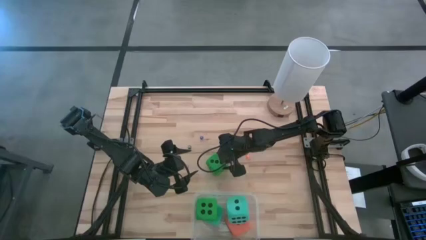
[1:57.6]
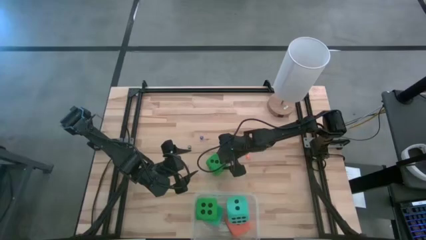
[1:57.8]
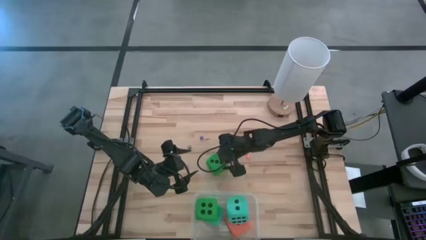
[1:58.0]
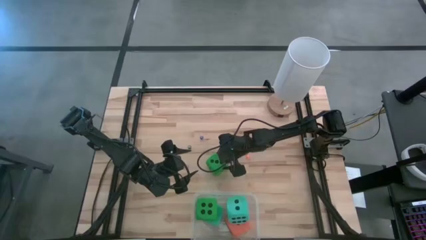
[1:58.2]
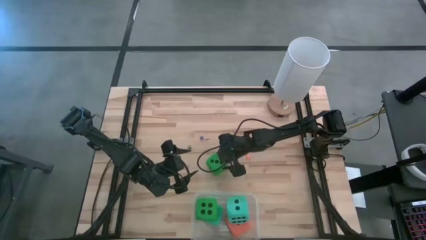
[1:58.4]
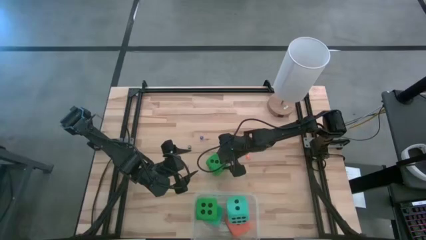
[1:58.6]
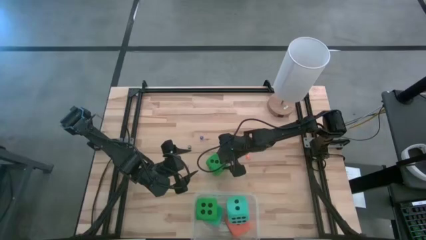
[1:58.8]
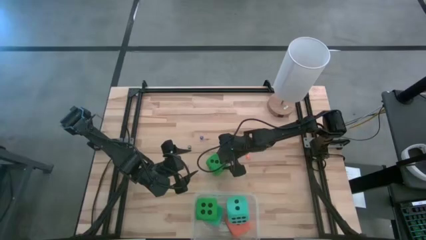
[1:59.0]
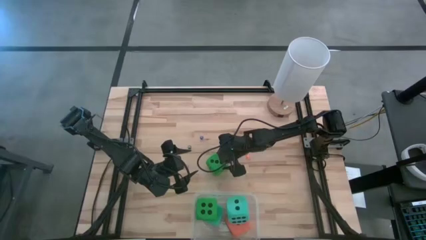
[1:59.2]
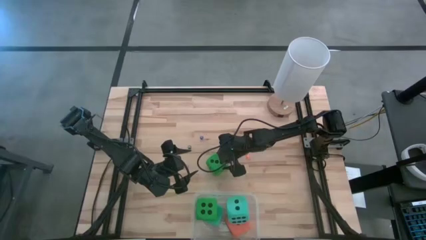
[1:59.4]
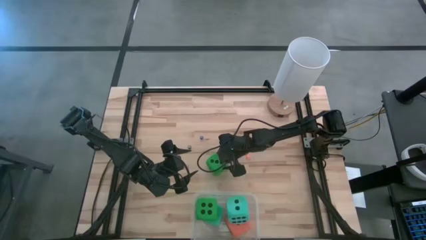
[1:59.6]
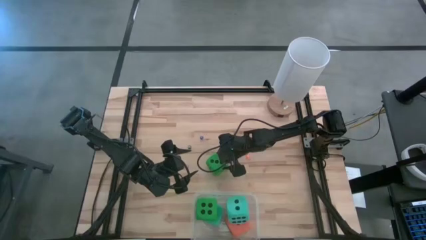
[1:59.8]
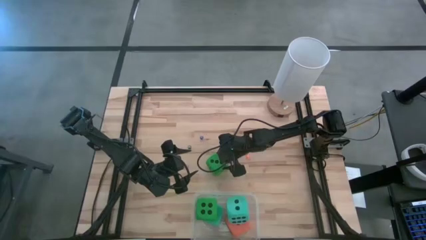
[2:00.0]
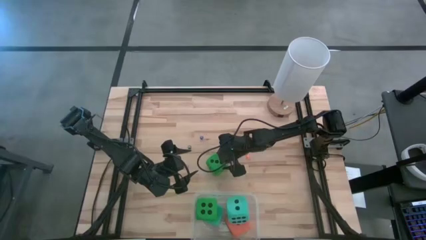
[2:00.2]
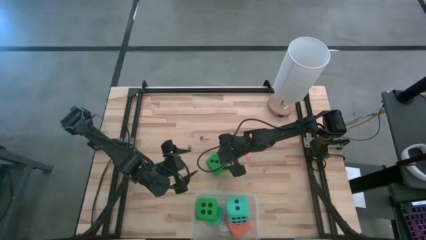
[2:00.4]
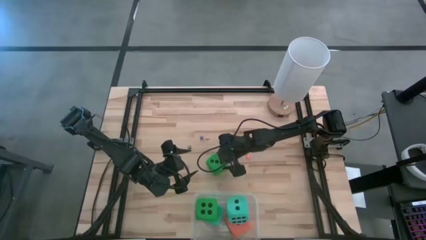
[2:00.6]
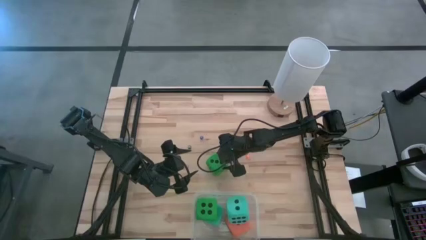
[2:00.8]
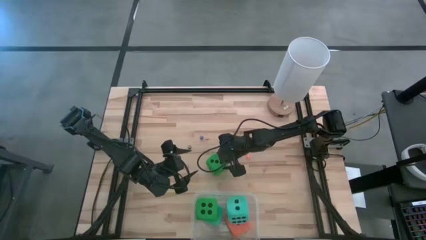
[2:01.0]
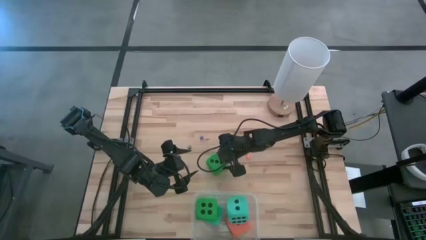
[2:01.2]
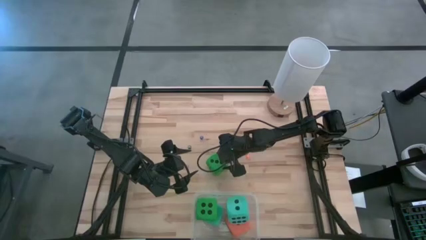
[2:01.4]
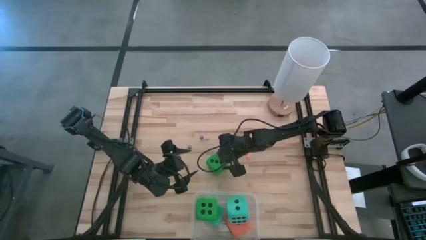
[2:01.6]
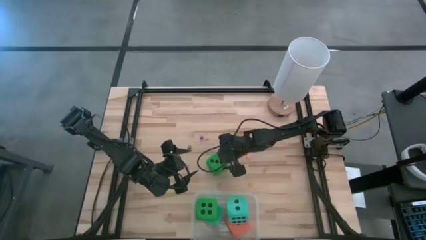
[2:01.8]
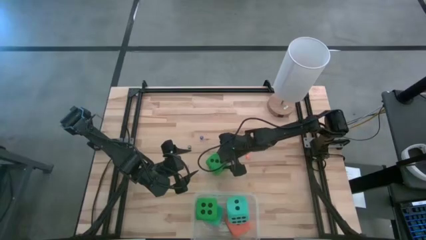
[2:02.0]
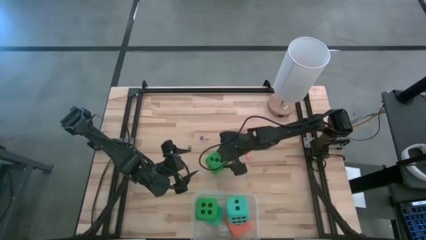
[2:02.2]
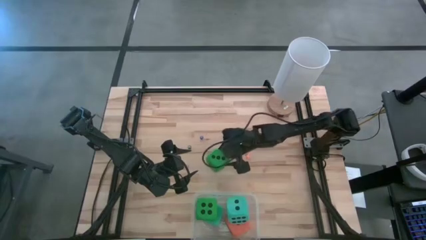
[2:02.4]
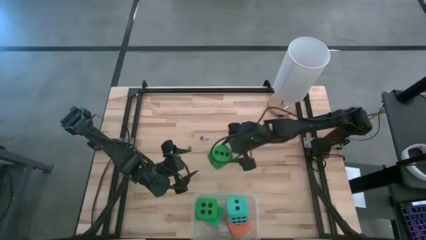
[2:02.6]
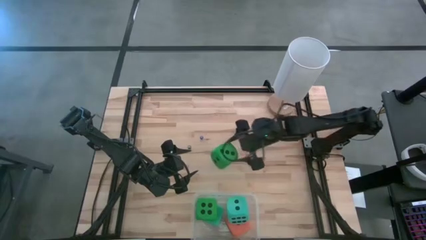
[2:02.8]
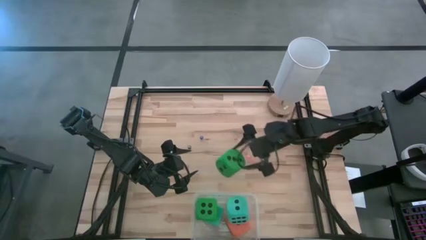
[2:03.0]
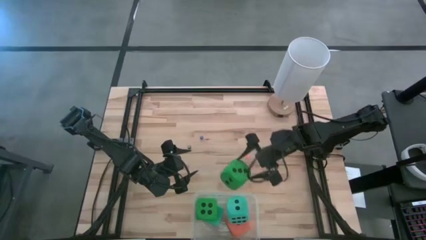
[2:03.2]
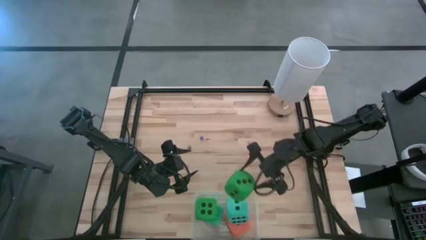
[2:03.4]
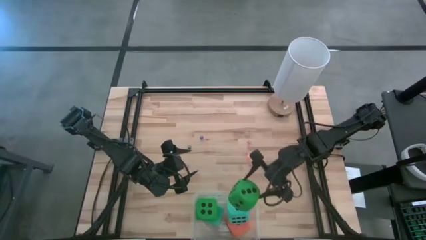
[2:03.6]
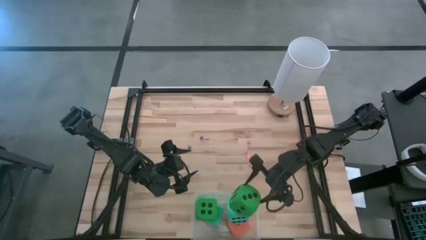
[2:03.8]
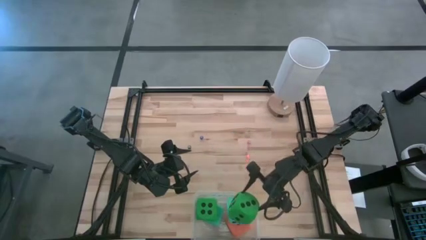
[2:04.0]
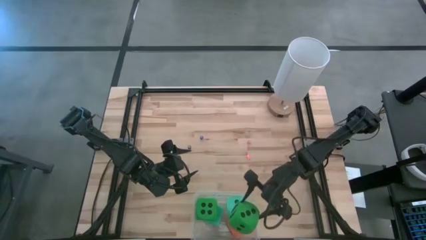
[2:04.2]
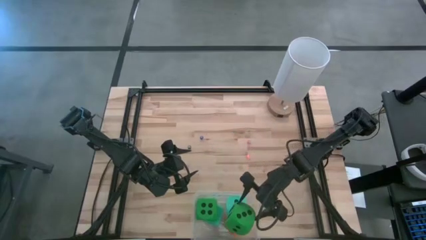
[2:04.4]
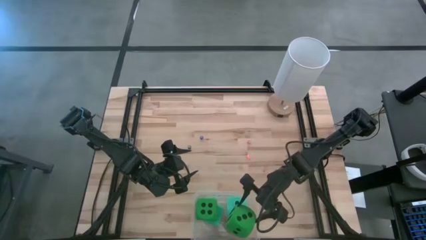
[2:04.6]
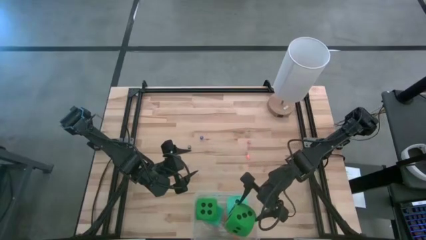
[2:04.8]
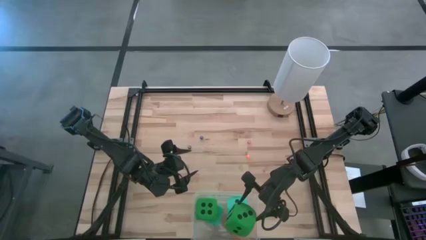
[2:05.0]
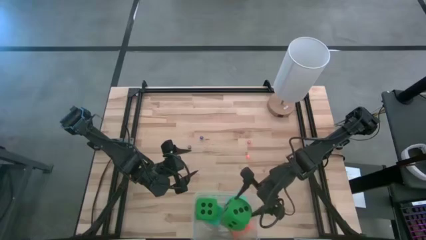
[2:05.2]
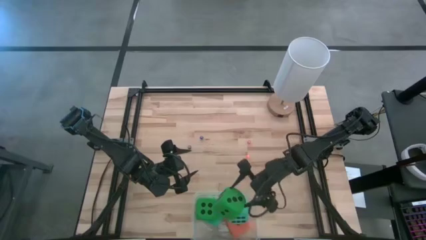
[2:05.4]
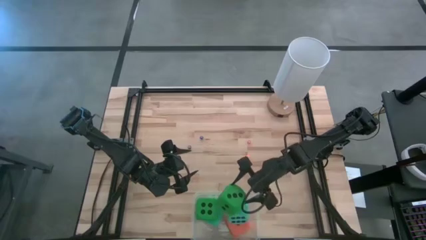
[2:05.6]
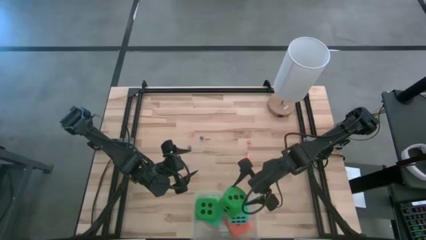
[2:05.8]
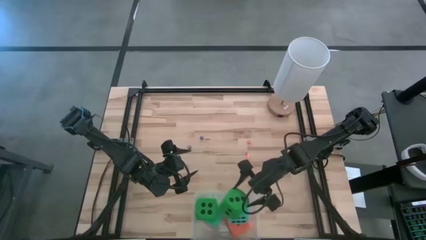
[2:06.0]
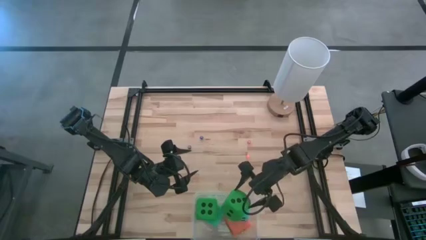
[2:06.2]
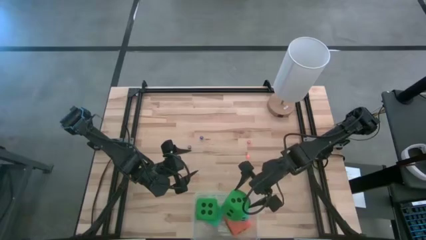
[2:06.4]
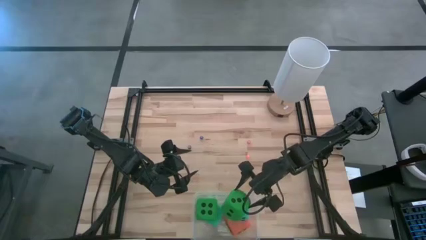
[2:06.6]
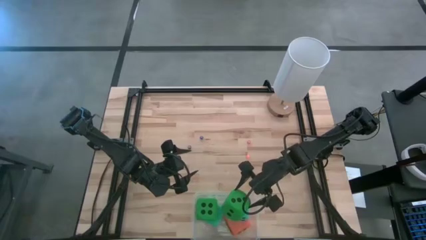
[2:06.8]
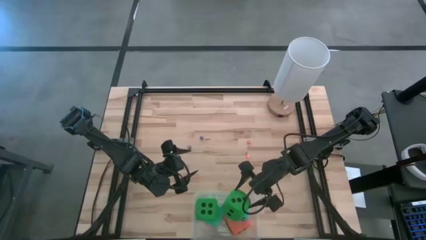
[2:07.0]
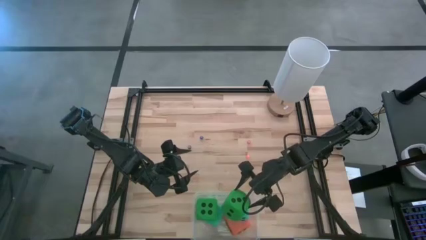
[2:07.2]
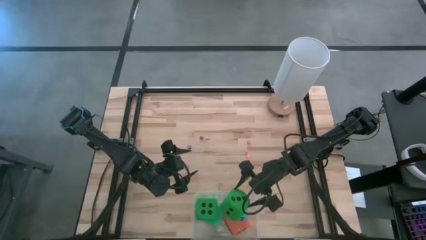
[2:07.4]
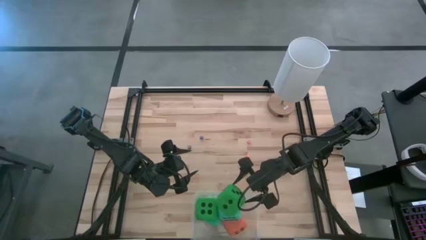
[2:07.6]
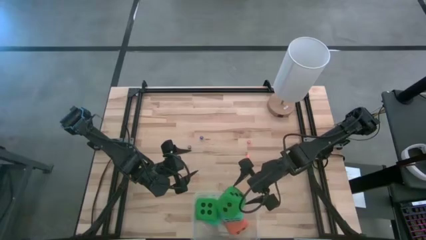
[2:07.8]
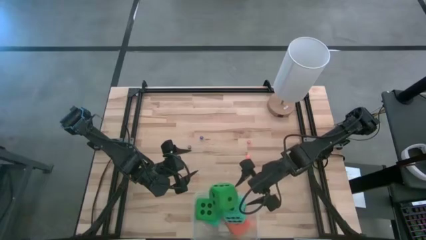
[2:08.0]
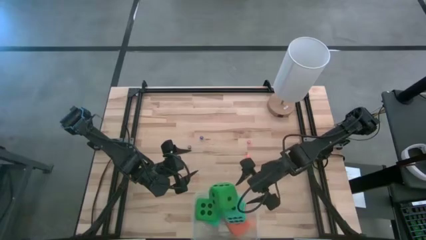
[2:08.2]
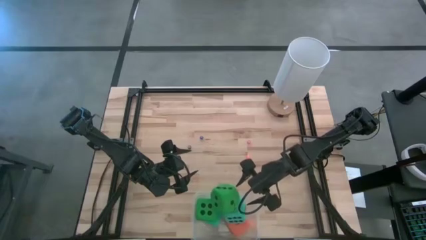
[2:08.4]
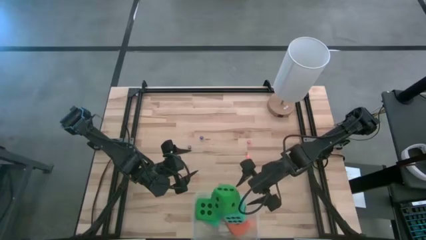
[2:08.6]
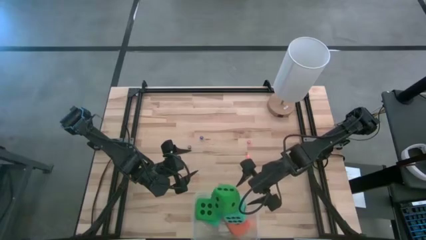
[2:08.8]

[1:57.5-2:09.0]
Task: Pick & Place Dice
Put the large green dice into the transparent bin

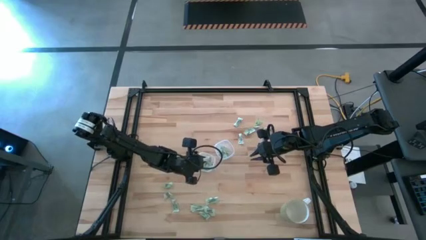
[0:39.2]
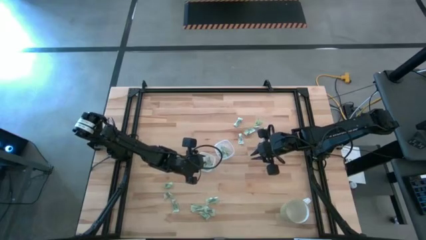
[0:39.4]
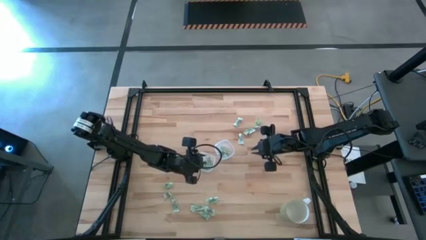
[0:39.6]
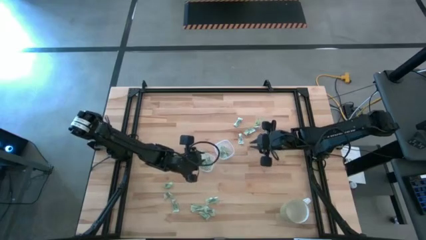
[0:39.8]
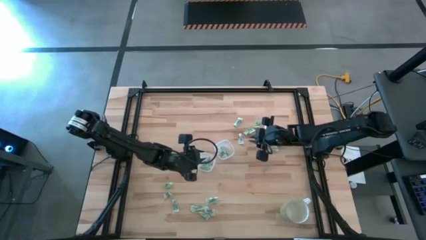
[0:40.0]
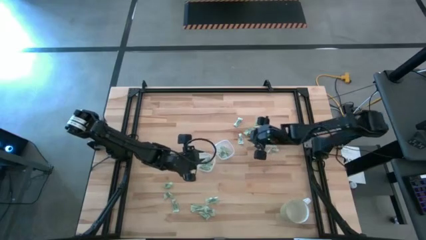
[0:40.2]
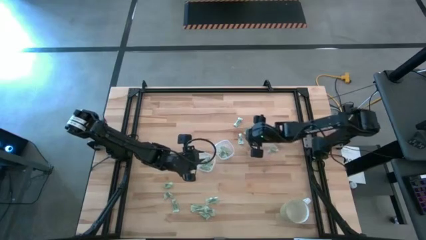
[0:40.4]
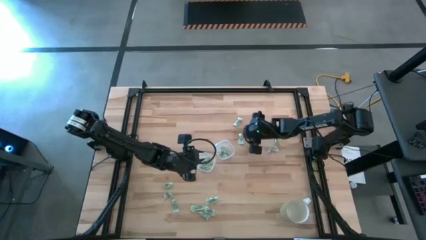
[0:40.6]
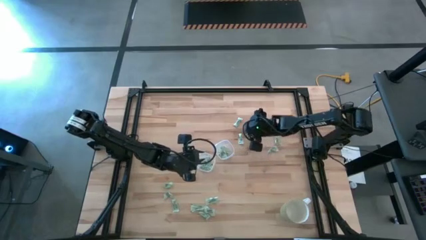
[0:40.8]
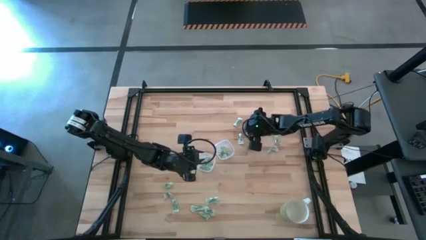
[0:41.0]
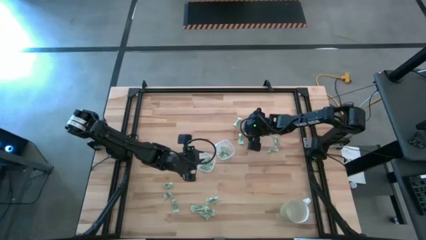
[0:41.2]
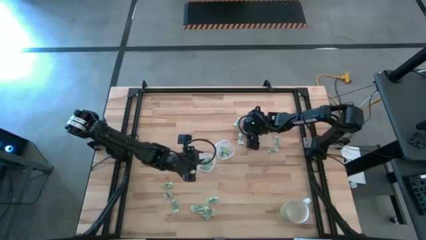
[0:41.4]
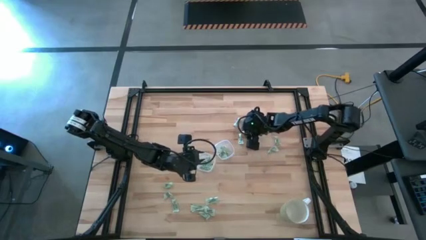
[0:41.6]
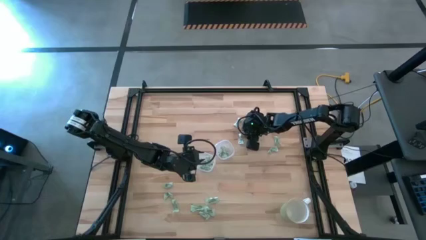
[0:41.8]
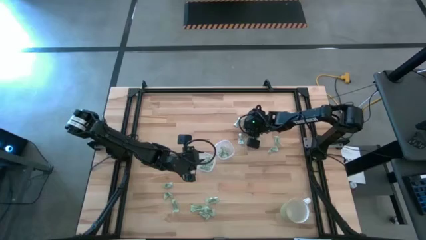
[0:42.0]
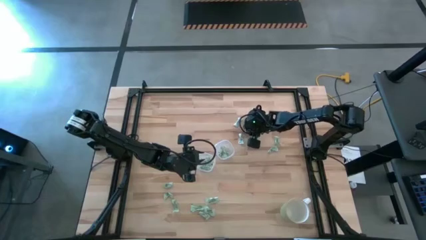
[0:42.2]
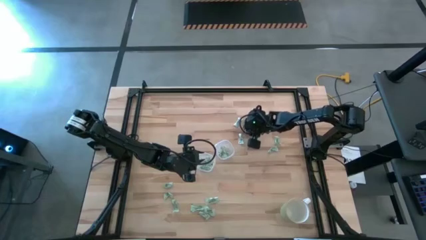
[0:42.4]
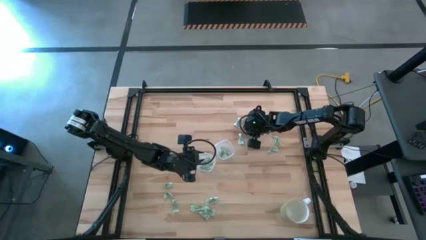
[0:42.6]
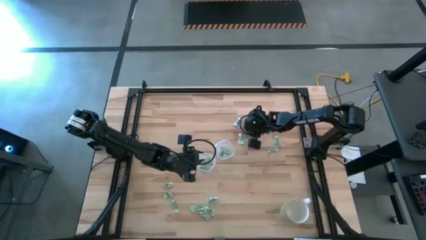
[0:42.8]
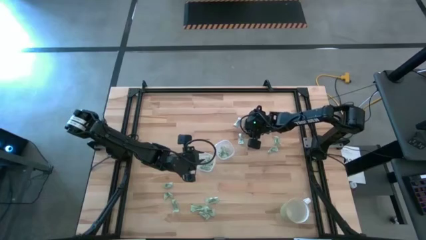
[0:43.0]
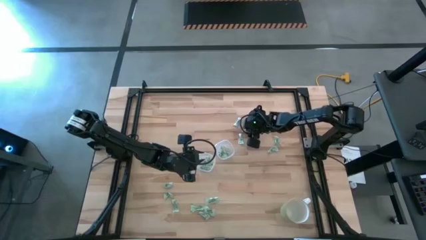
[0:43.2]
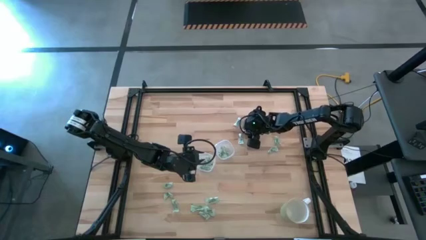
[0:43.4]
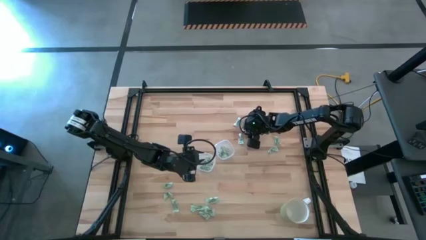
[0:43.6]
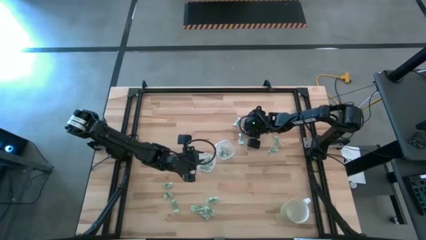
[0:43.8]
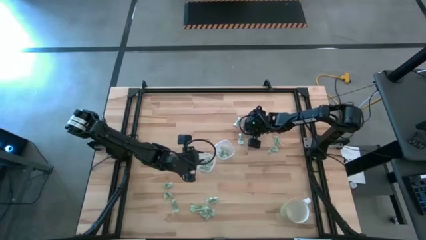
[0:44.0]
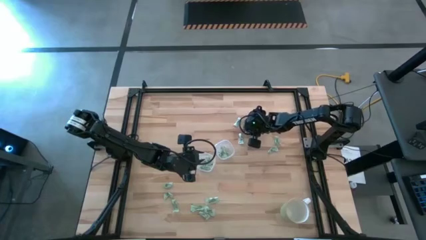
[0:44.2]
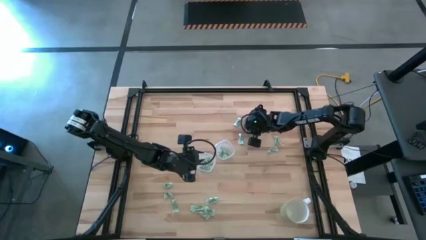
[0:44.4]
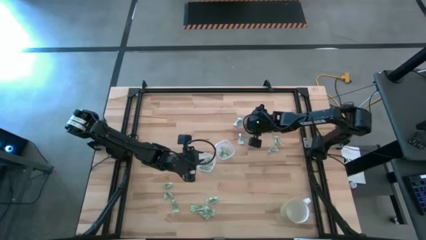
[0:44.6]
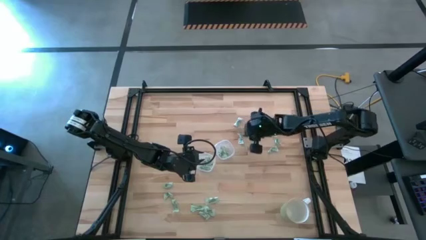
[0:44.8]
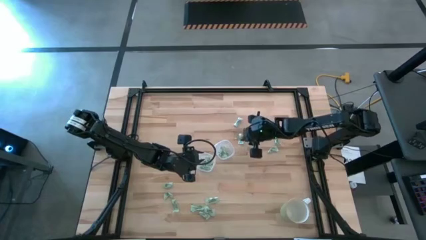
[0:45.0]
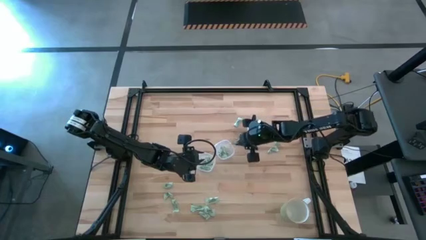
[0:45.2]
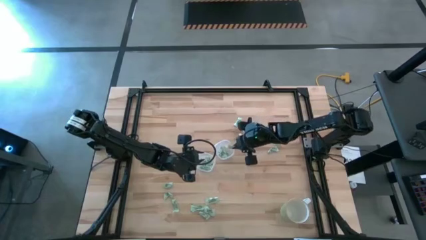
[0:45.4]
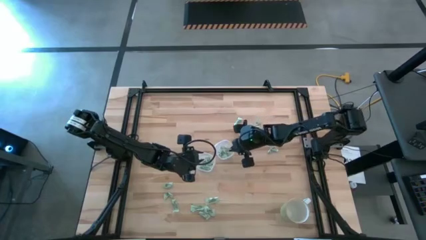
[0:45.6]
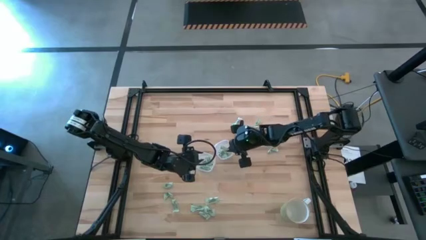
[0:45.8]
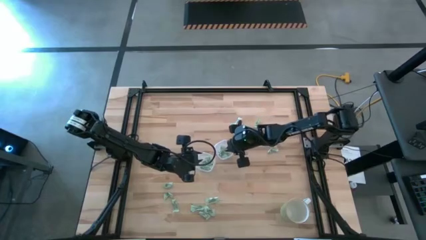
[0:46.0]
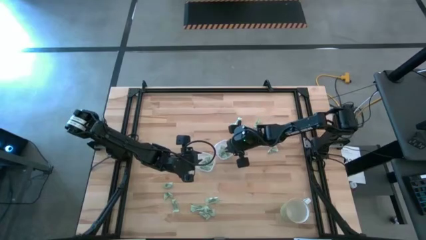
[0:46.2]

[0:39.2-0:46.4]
Task: Pick and place items into bin
Put the stevia packet into the right bin
